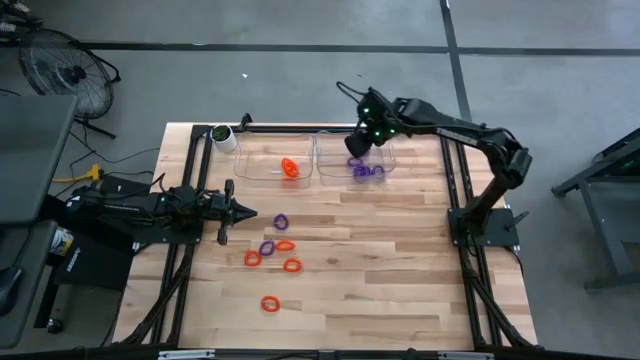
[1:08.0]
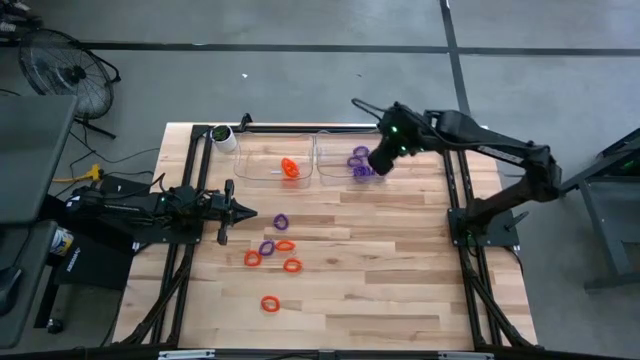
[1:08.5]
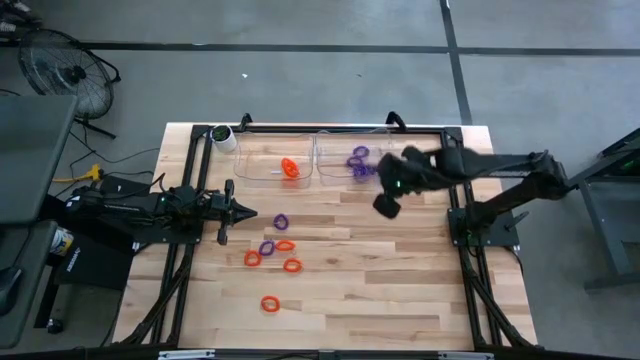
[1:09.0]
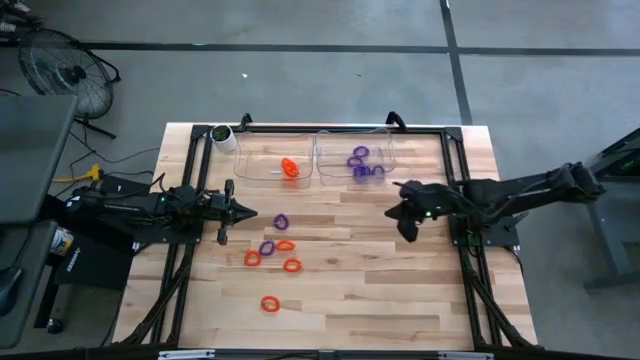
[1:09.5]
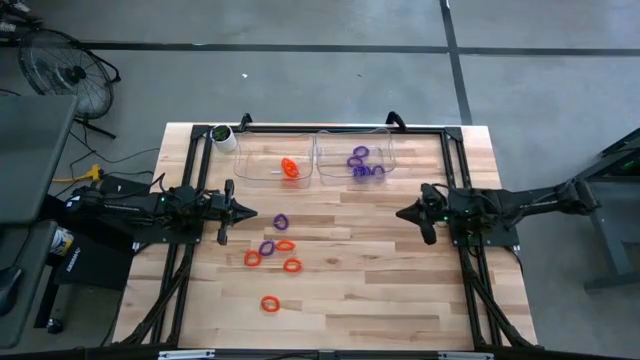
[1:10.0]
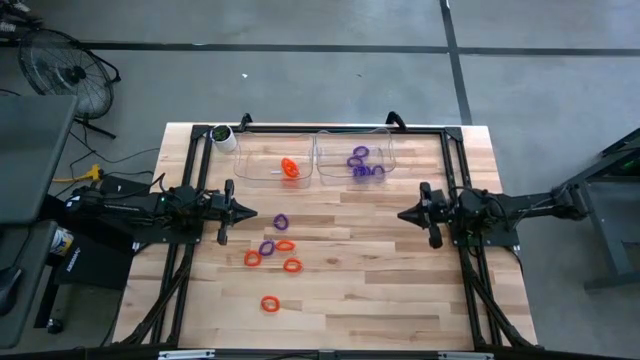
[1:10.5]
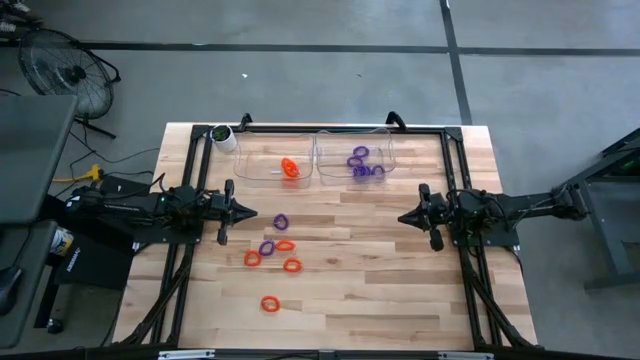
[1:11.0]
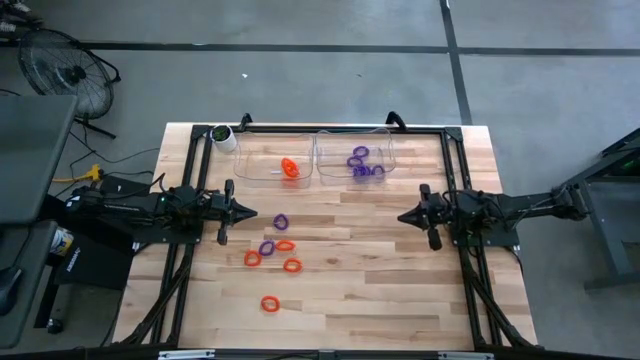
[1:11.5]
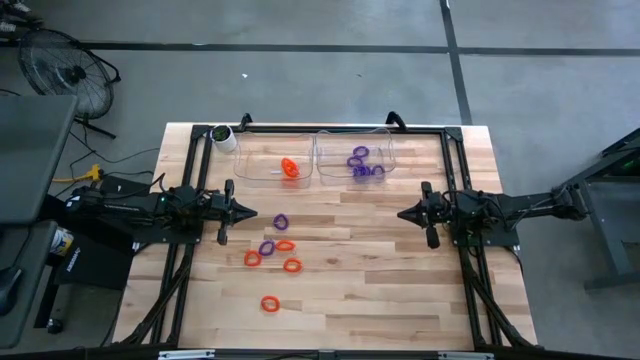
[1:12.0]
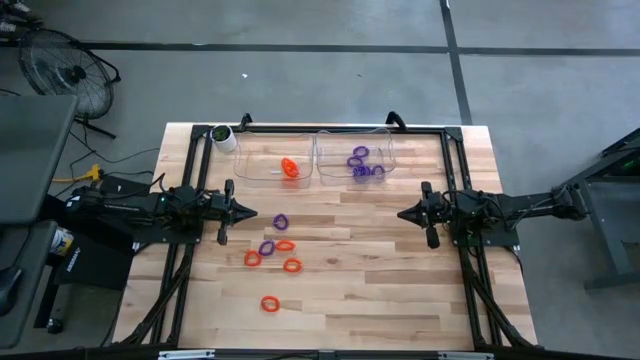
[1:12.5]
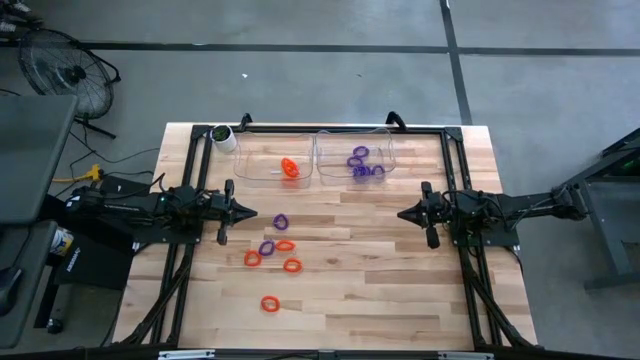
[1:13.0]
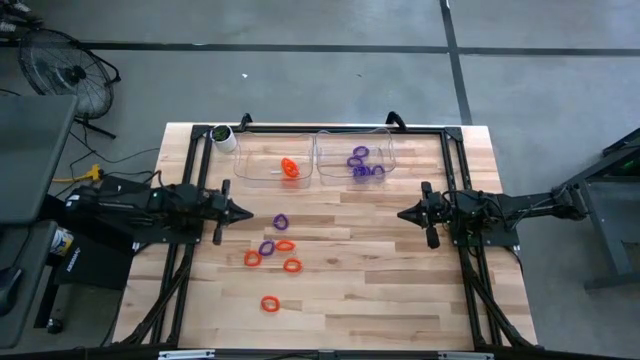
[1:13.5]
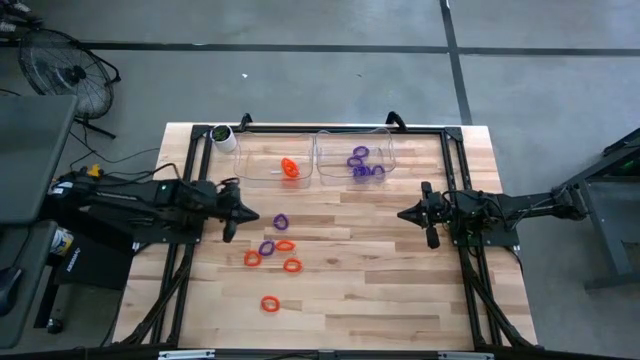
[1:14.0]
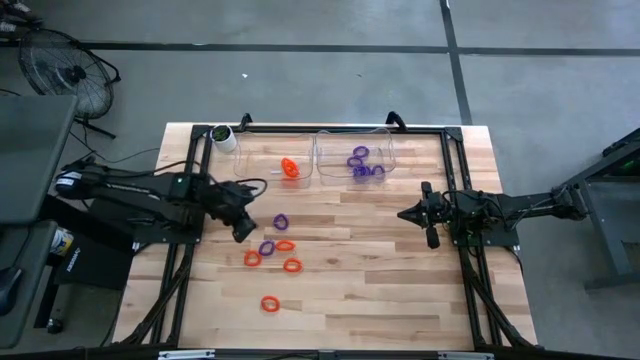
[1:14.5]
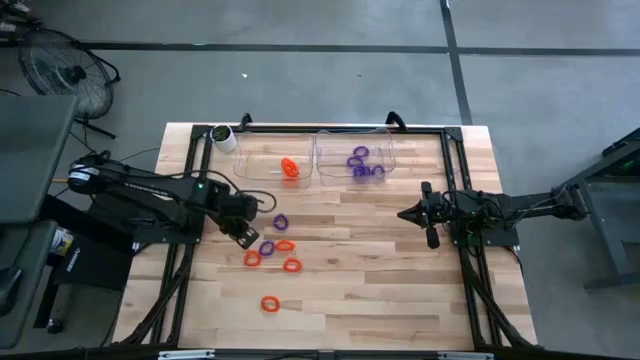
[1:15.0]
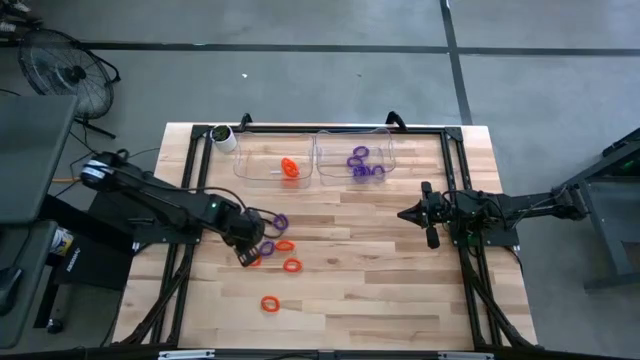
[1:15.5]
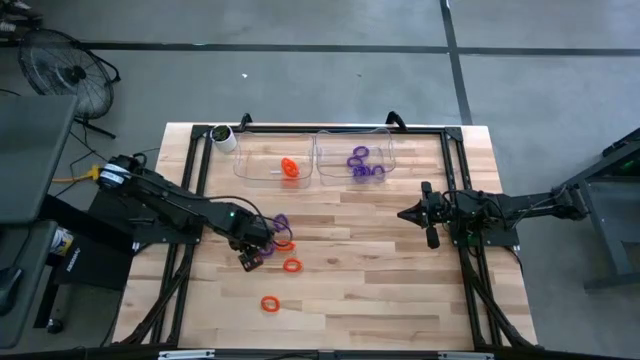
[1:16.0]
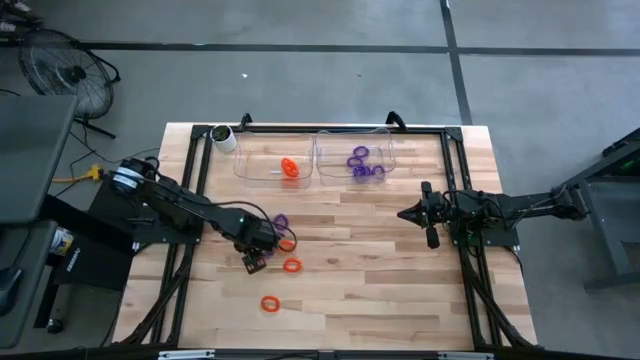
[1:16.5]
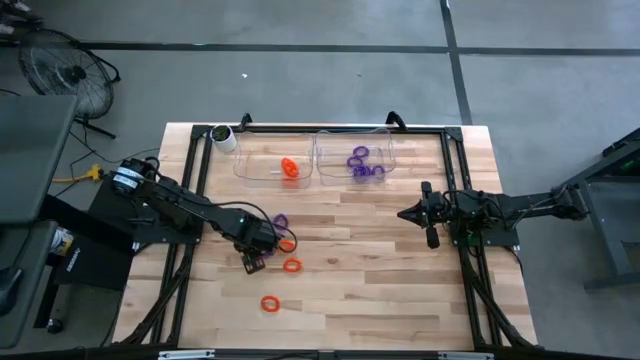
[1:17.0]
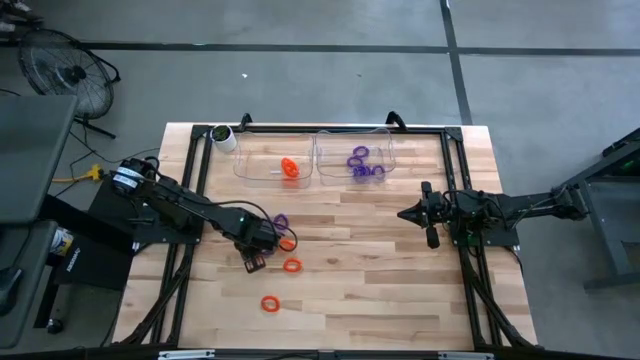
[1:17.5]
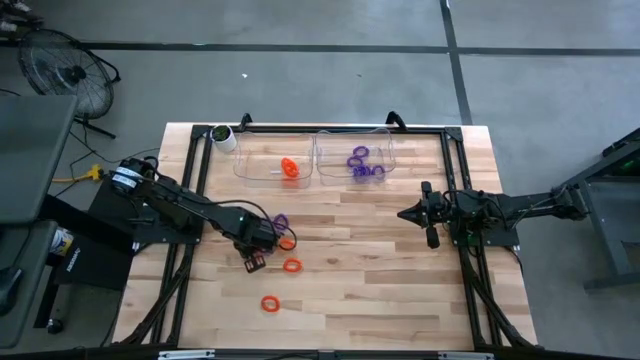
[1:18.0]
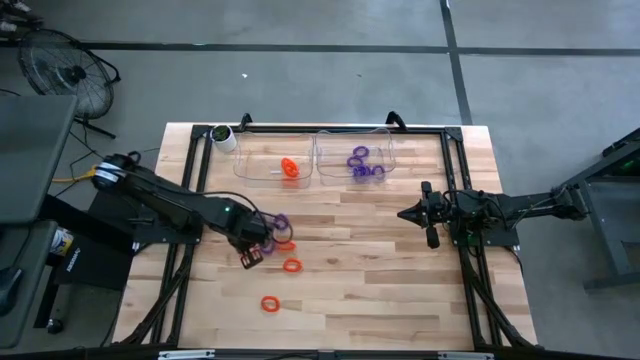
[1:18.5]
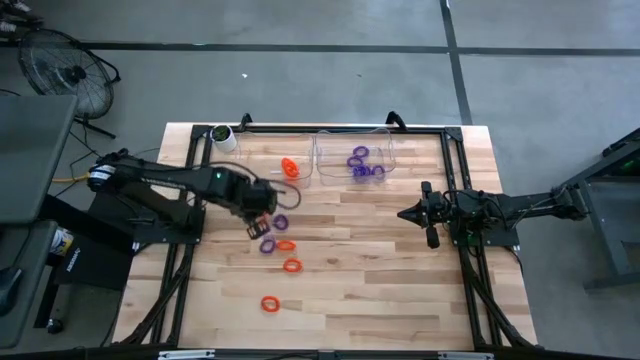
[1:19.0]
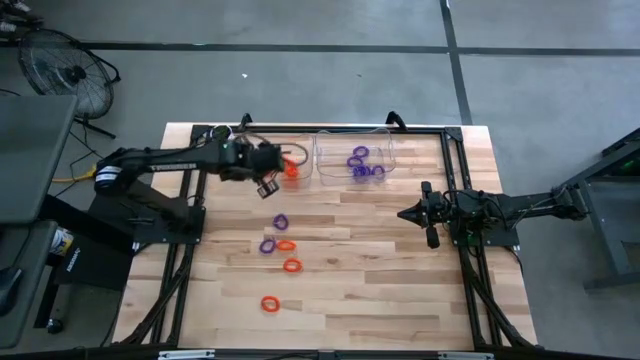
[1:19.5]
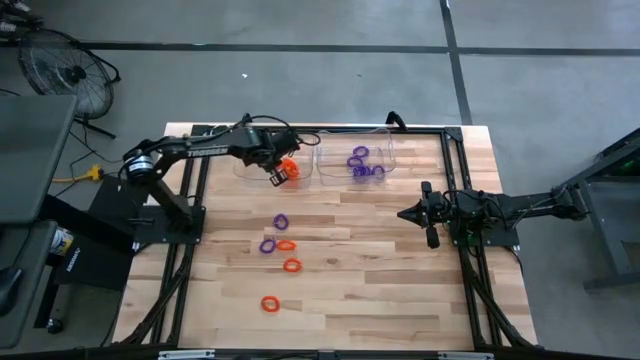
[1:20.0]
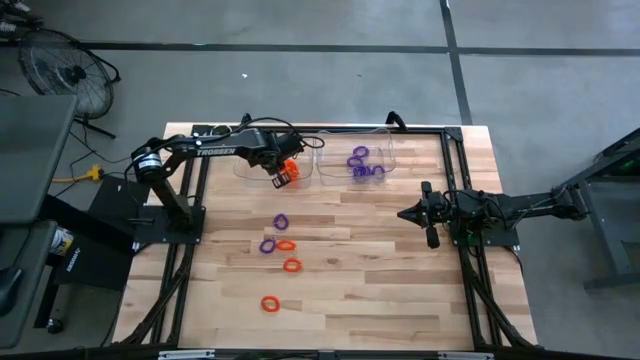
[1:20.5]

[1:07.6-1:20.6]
Task: Sort spring keychains
Put the orange spring keychain into the left bin

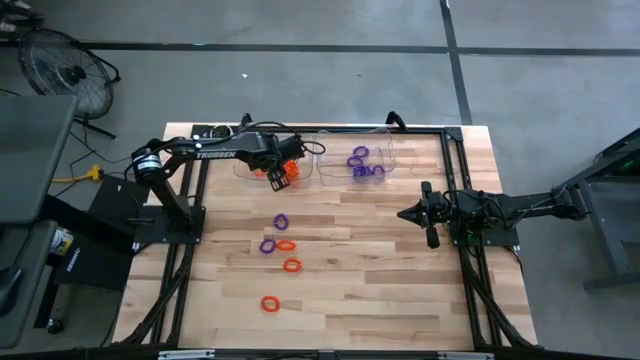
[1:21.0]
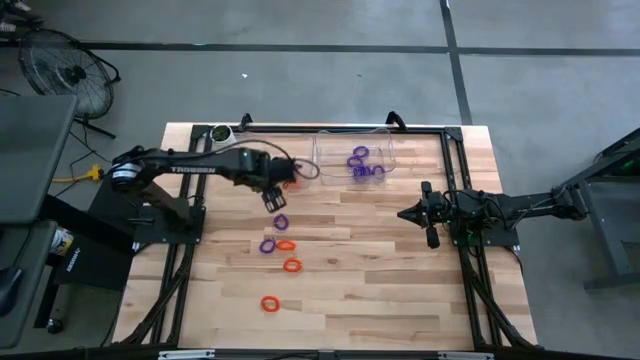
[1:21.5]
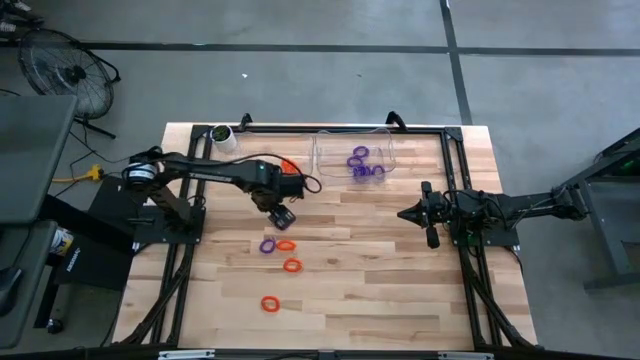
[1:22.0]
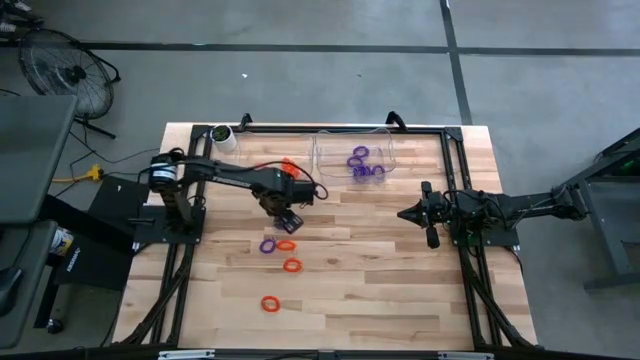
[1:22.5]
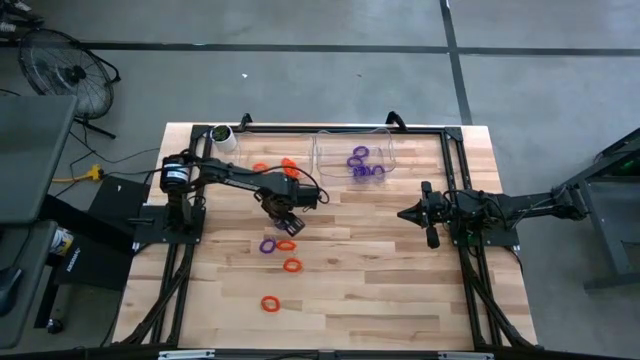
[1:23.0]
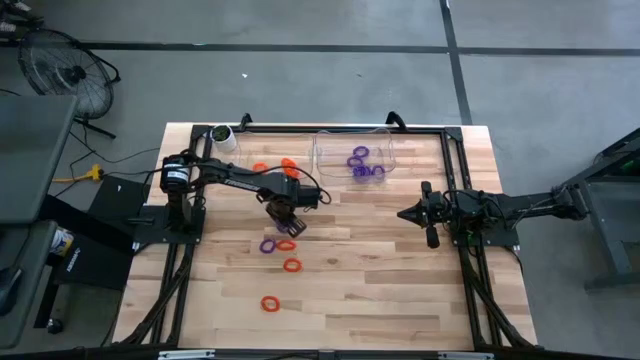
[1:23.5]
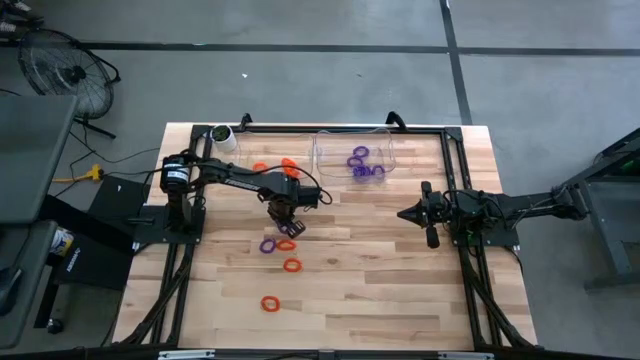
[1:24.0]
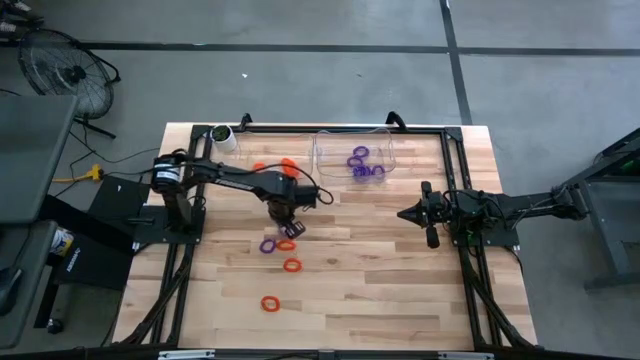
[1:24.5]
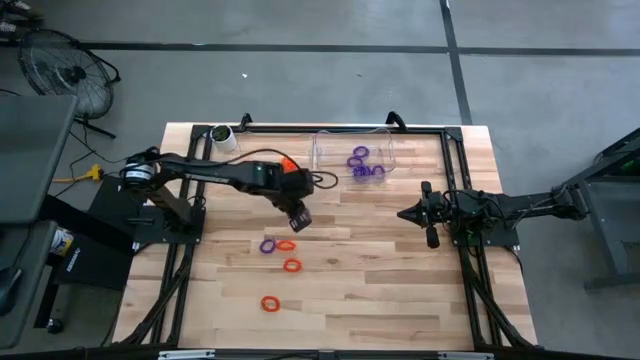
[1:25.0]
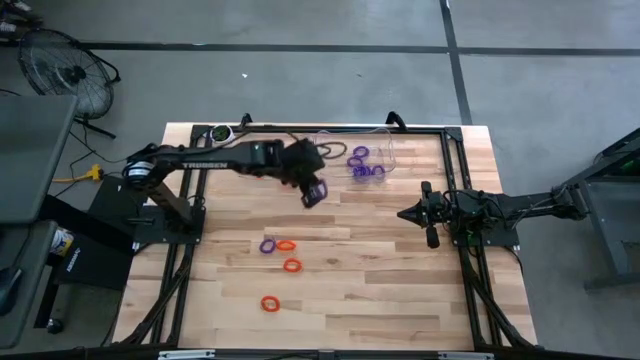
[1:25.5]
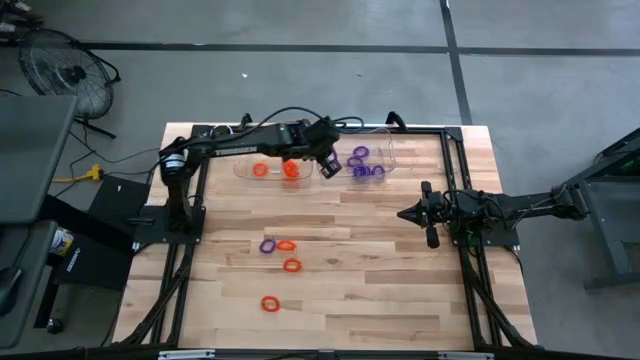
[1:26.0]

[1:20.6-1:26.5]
Put the top violet spring keychain into the right bin

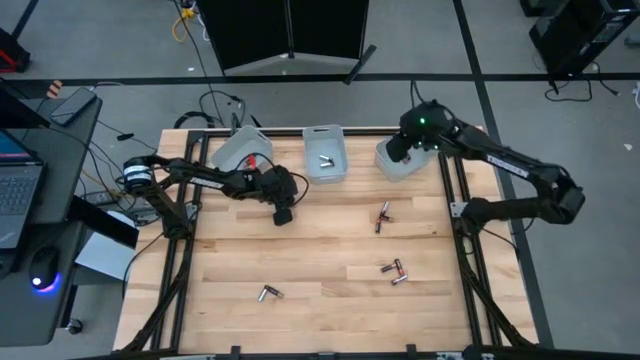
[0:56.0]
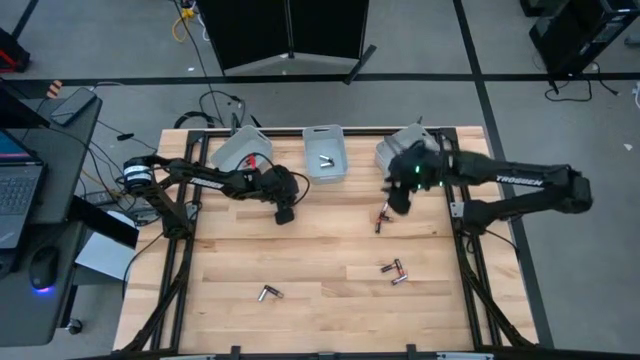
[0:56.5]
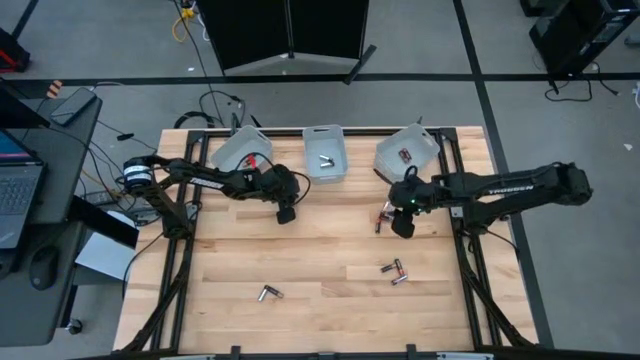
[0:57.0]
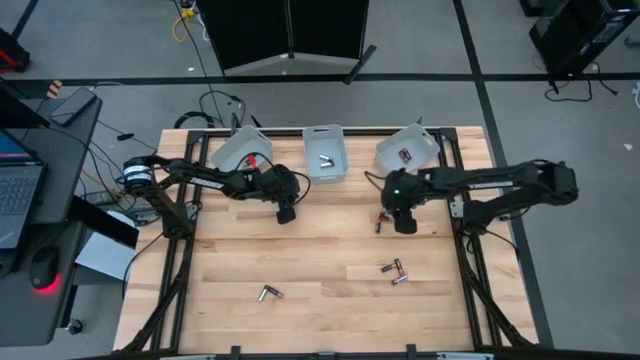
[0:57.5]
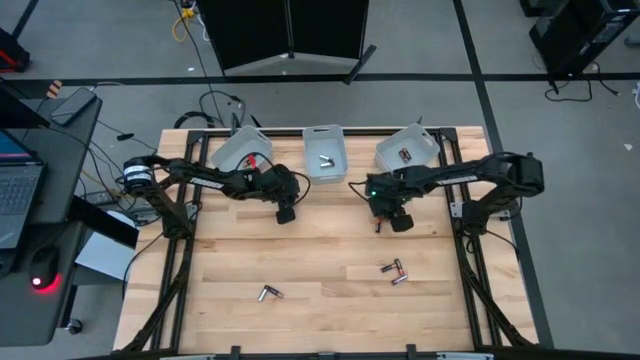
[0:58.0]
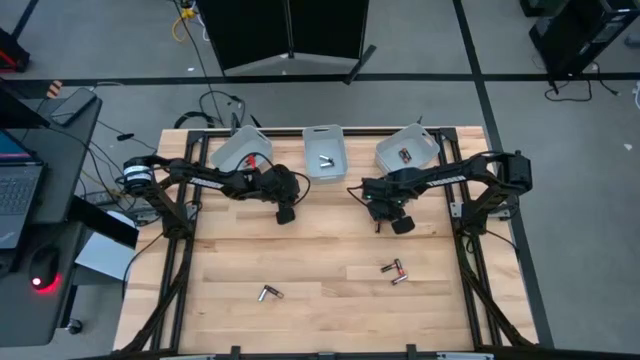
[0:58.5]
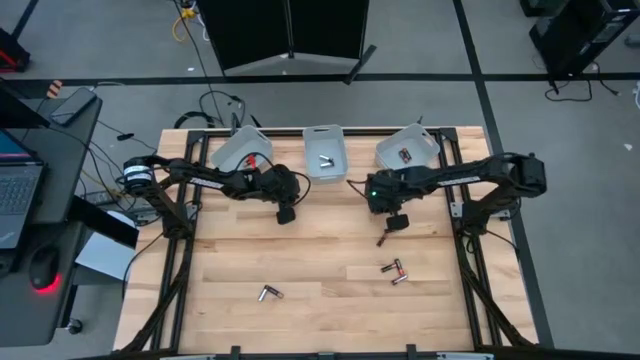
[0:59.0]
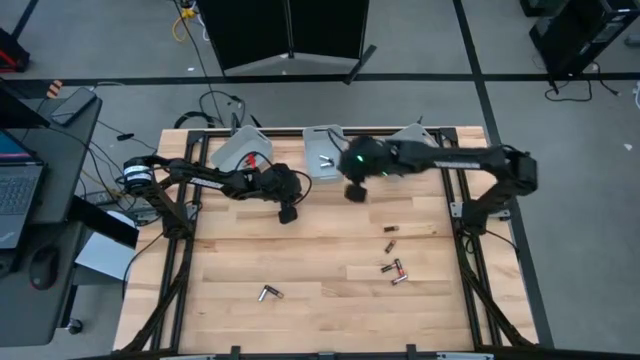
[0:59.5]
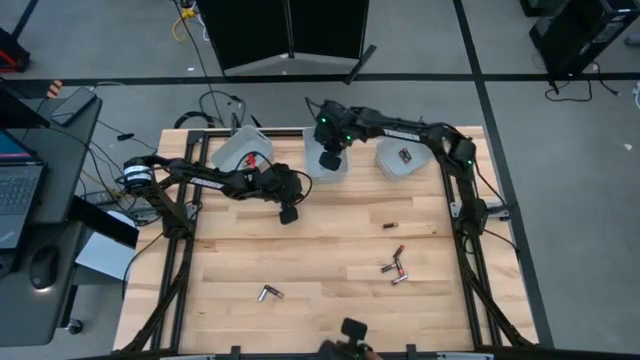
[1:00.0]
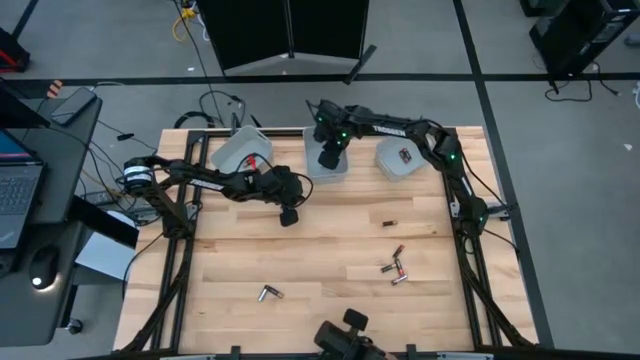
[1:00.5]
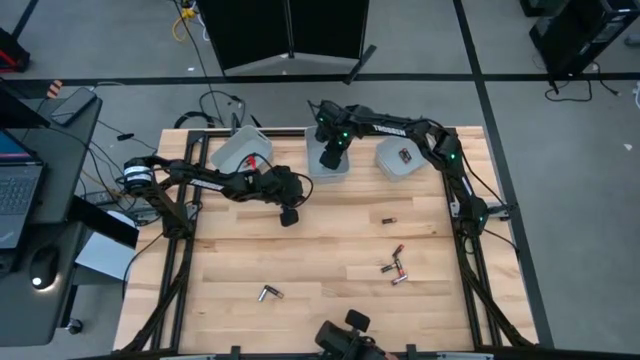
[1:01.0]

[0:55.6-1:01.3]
Task: Sort batteries
Put the silver battery into the middle gray bin
